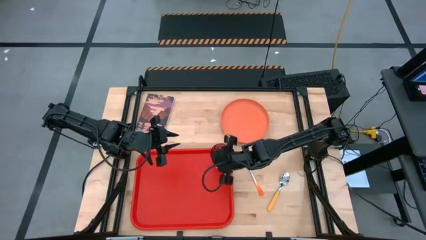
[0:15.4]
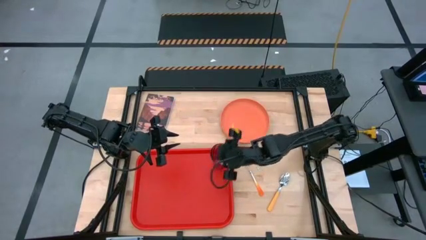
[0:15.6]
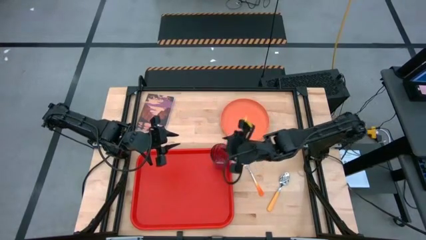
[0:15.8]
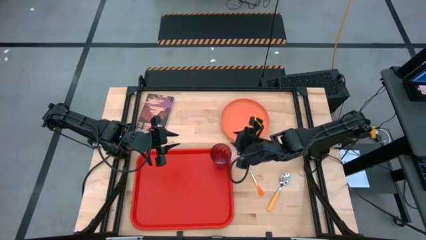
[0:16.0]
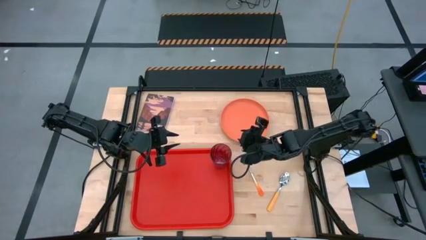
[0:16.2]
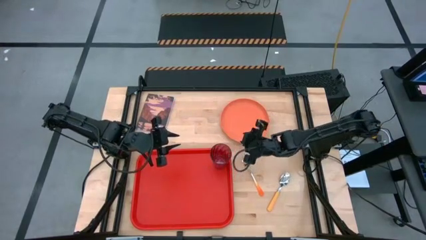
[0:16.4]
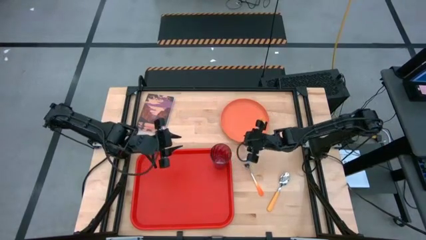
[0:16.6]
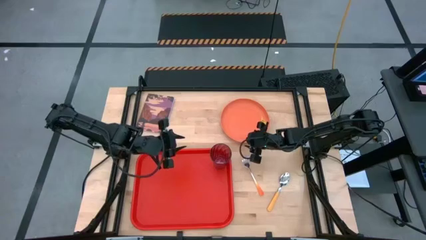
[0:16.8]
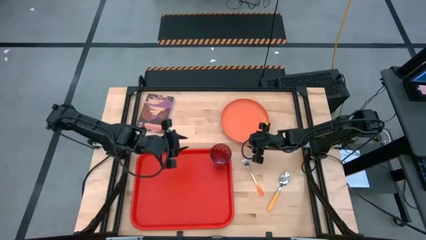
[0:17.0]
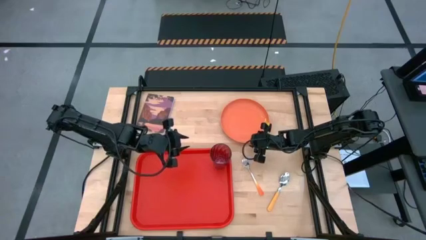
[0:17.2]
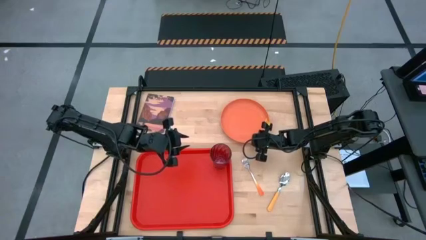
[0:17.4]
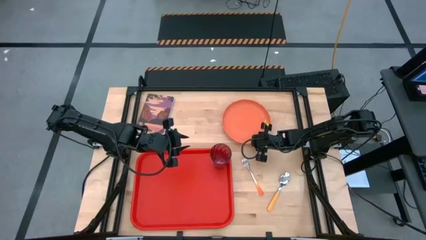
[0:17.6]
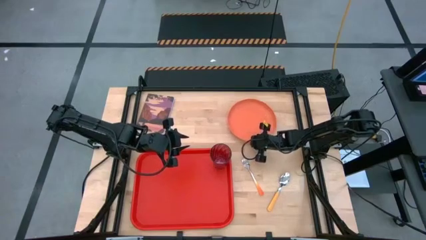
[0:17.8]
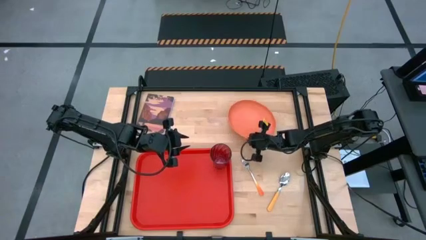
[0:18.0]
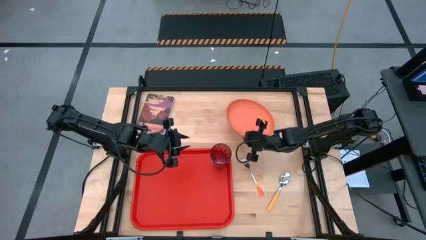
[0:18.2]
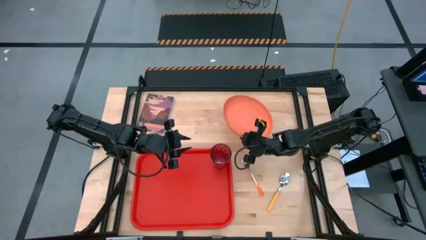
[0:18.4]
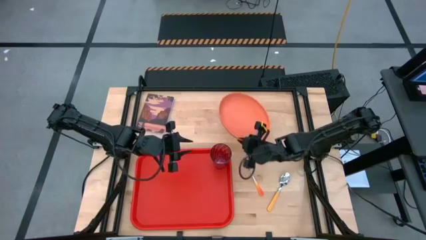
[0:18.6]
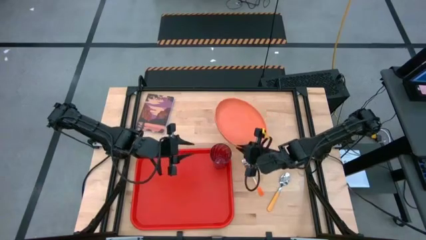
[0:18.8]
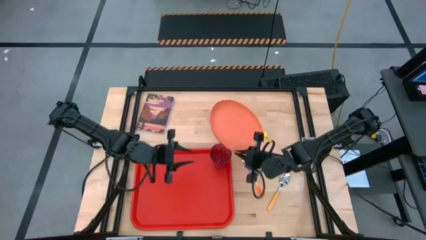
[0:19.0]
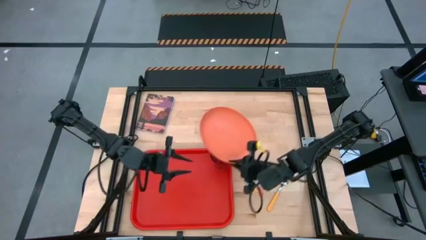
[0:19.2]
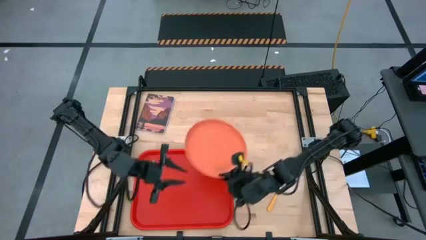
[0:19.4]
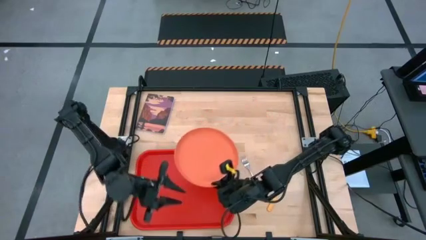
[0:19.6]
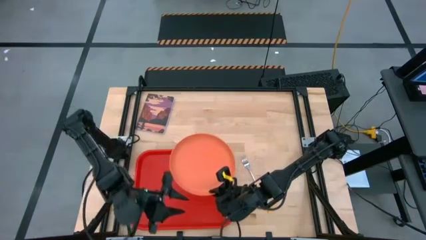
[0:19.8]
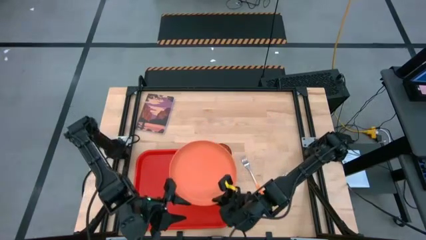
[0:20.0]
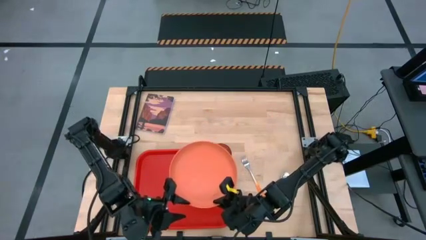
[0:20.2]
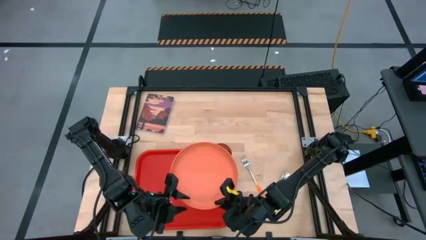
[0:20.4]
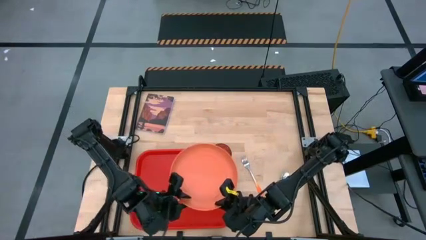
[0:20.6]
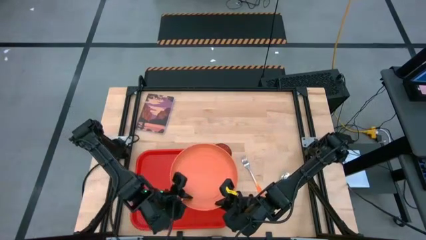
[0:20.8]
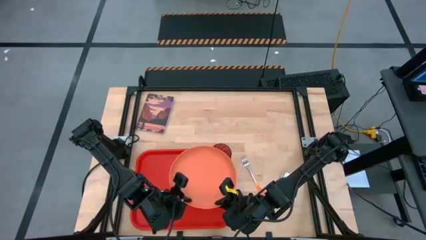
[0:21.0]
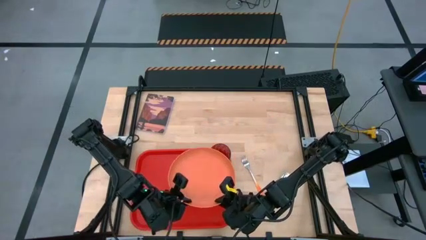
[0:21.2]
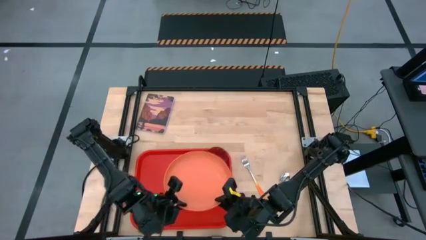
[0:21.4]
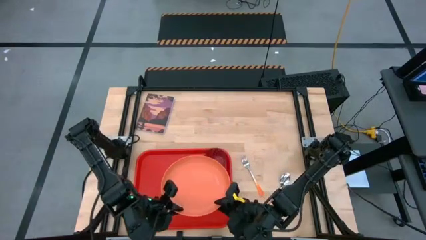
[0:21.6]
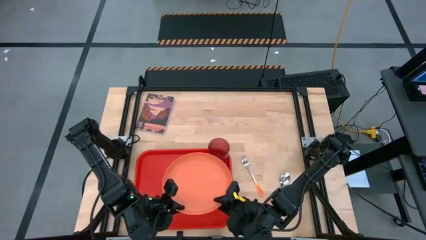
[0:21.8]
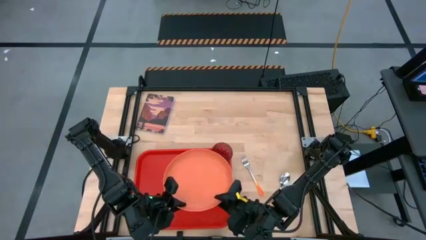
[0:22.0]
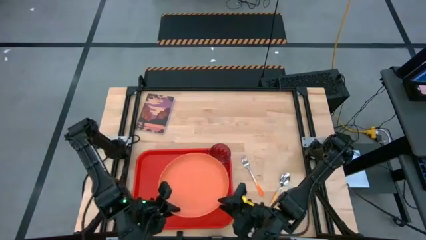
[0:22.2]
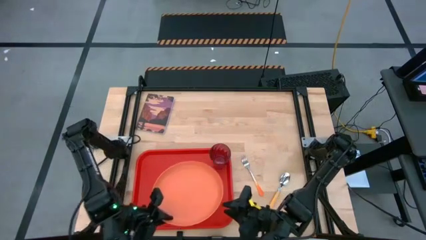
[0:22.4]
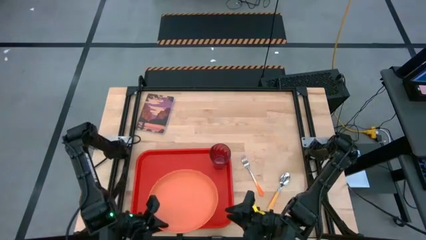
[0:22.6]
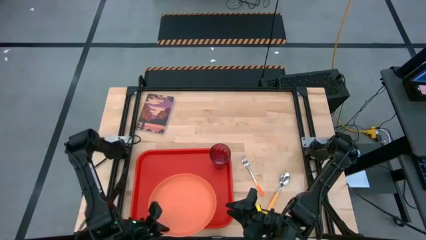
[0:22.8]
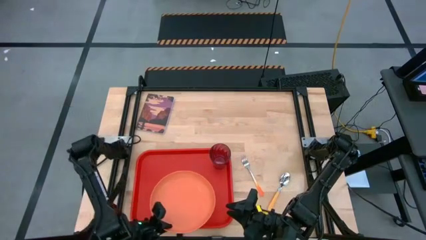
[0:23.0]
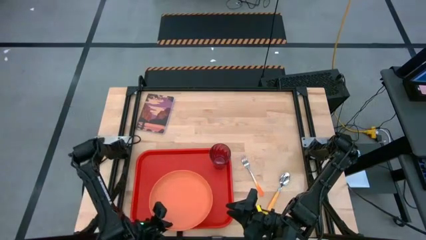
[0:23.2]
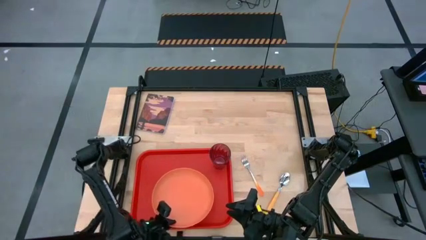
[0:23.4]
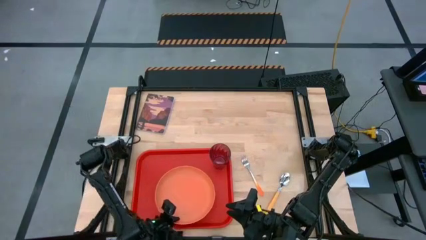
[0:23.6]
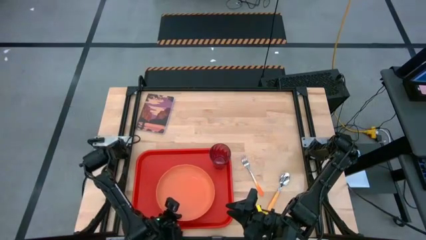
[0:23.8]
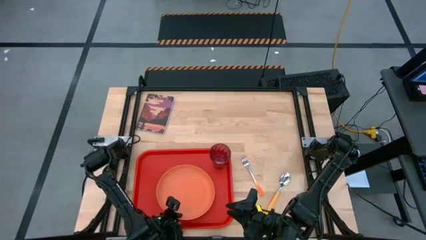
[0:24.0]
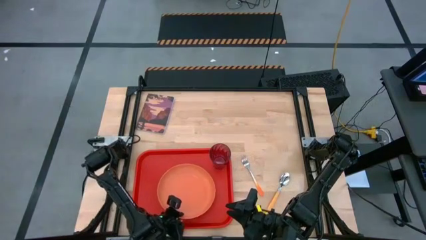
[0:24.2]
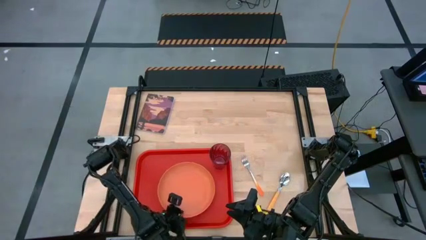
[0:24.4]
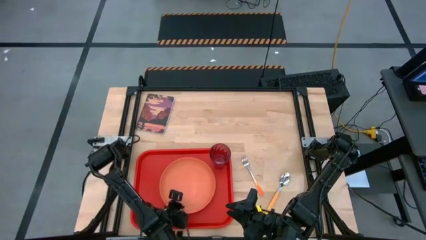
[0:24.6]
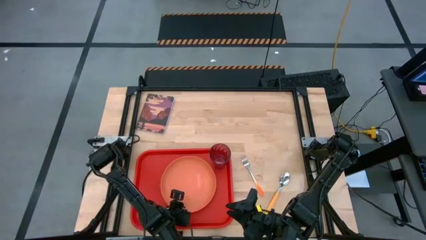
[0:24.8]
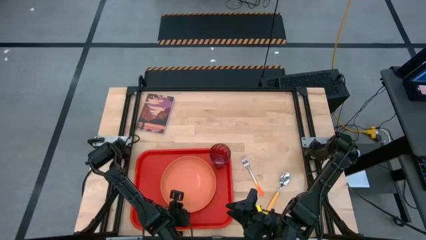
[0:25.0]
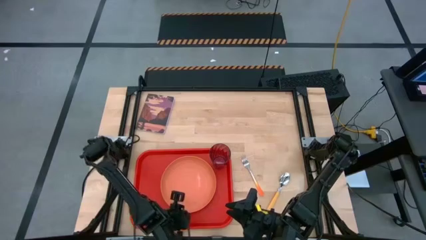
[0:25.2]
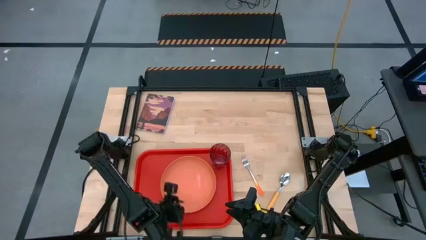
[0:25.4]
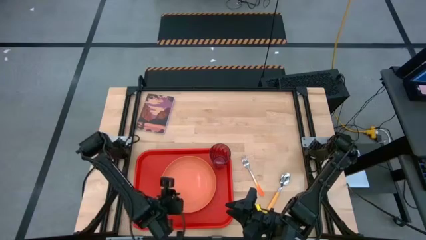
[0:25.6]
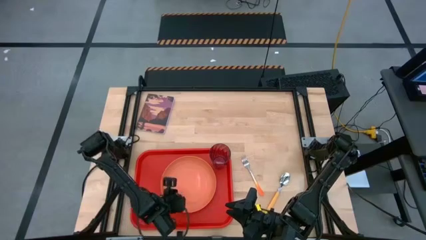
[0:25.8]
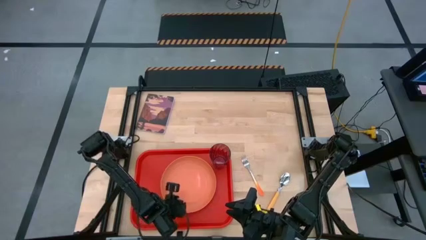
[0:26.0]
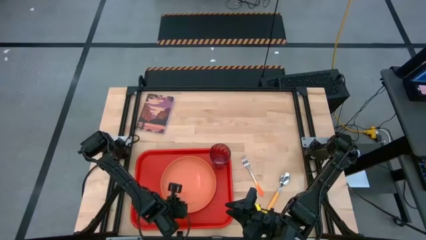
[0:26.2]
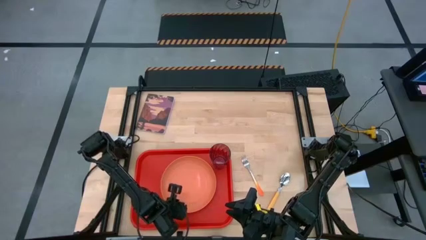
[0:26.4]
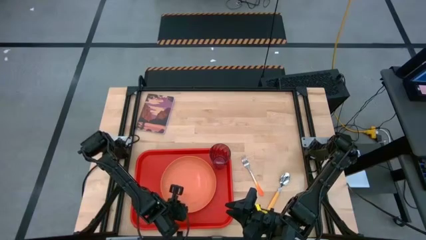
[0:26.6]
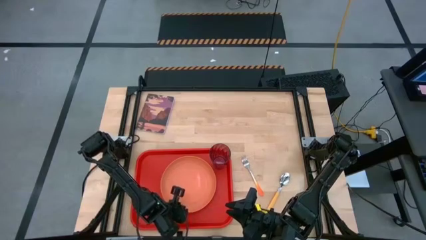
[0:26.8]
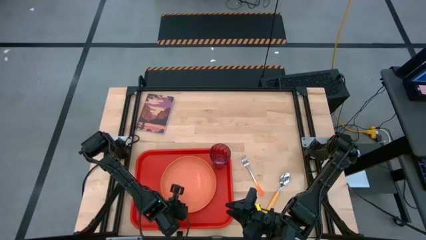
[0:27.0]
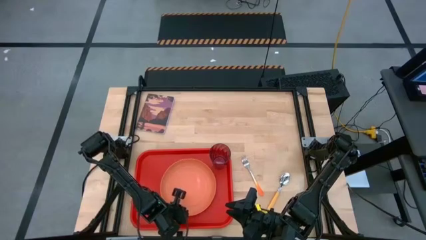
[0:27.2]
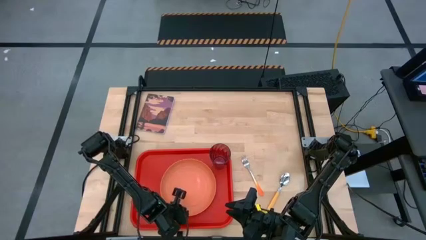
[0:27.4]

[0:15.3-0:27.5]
Task: Pick and place plate/cup/fork/spoon on tray
Put the orange plate on the red serving tray to the bottom left of the red cup

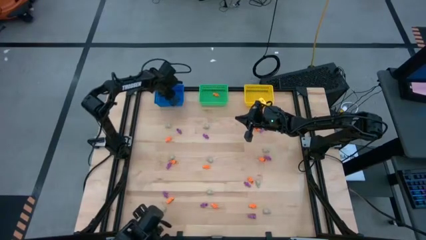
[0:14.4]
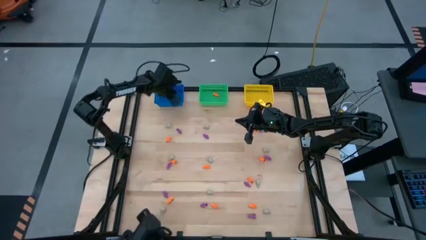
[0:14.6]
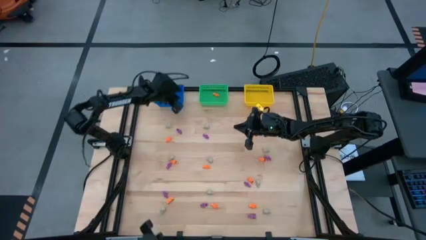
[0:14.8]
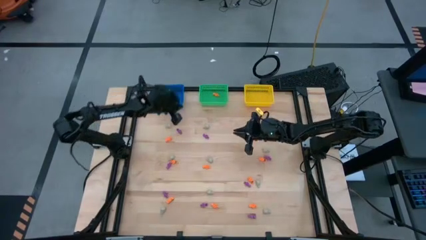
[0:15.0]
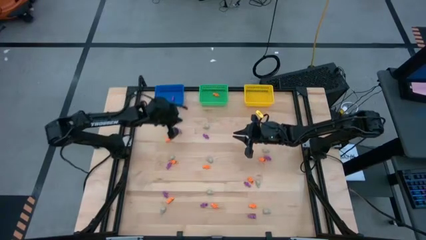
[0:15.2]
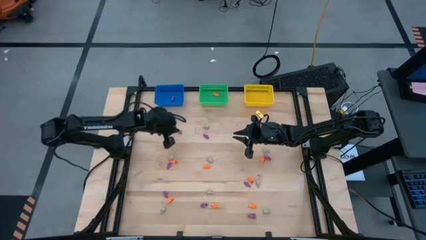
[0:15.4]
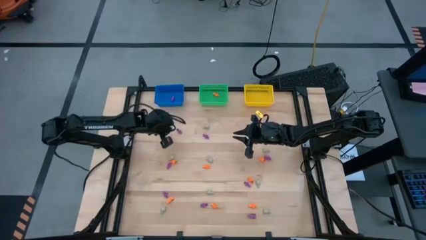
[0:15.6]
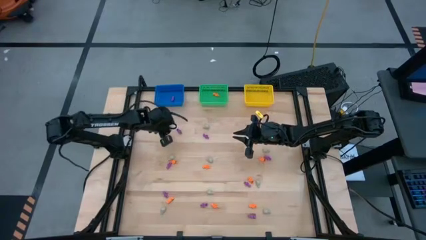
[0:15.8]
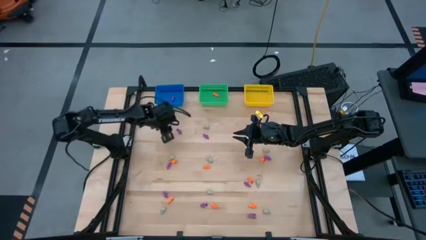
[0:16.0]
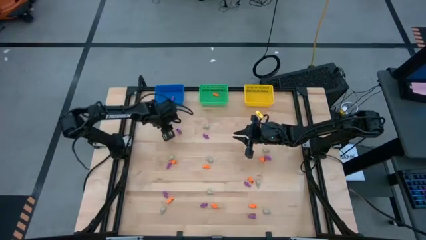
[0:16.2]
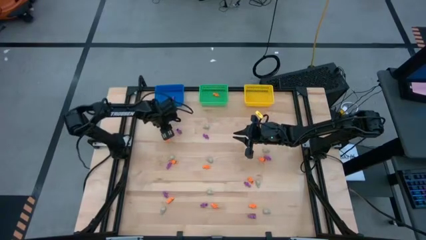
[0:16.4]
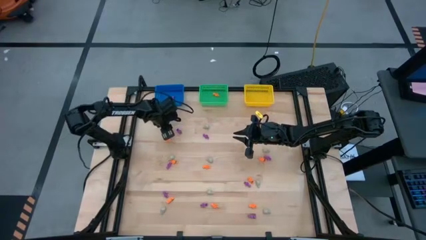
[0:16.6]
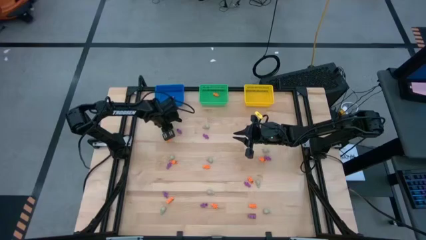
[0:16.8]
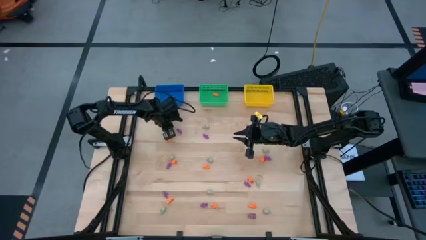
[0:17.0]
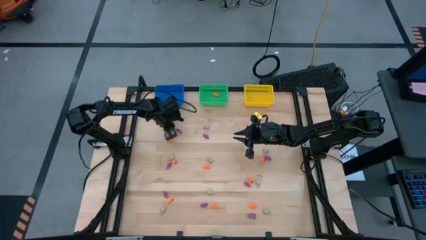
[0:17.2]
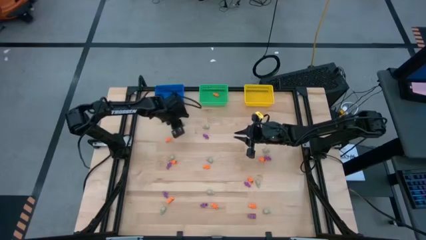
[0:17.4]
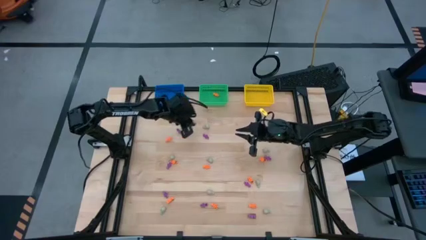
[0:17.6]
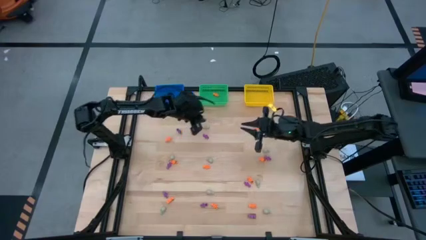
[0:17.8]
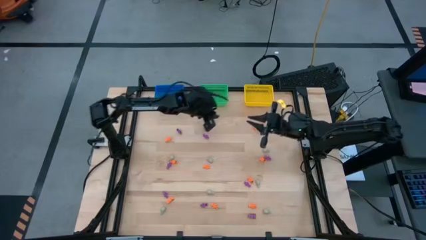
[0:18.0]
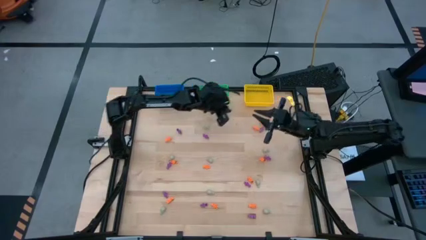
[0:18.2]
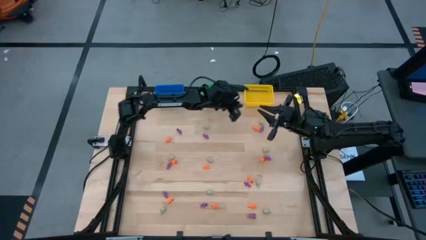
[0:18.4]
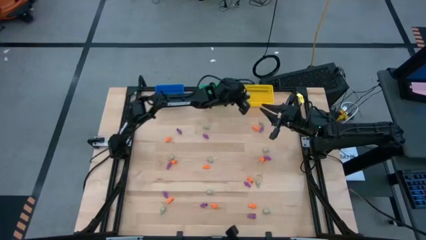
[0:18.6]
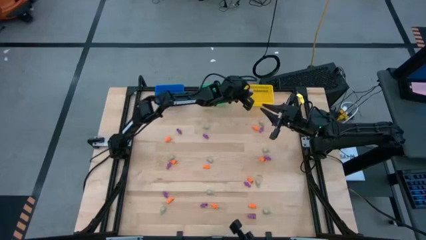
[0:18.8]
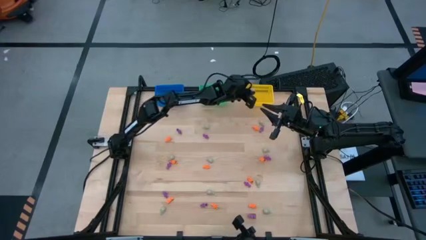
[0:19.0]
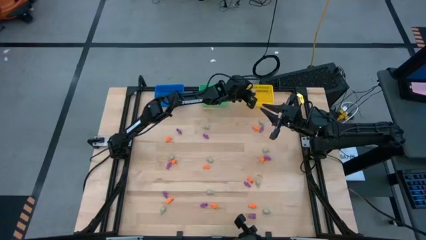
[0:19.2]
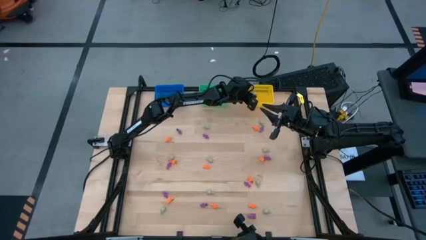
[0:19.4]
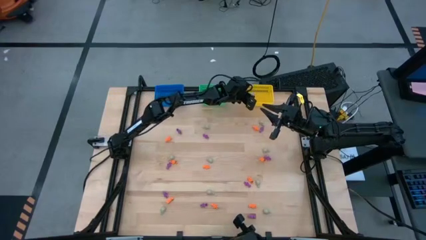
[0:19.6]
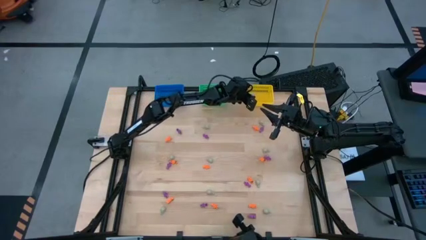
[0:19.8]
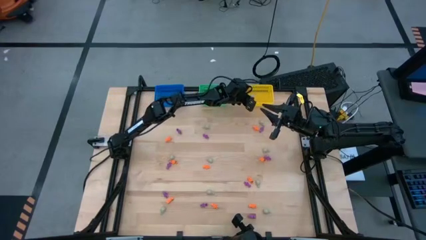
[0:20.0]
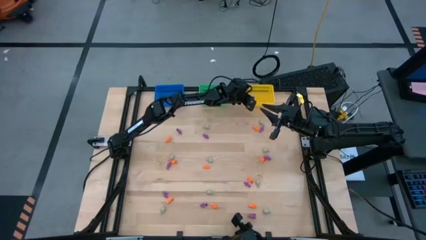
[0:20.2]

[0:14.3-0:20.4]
Task: Sort Halloween decoration
Put the grey skull toy into the yellow basket
